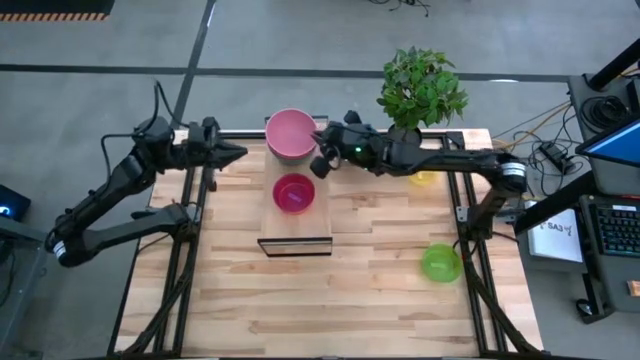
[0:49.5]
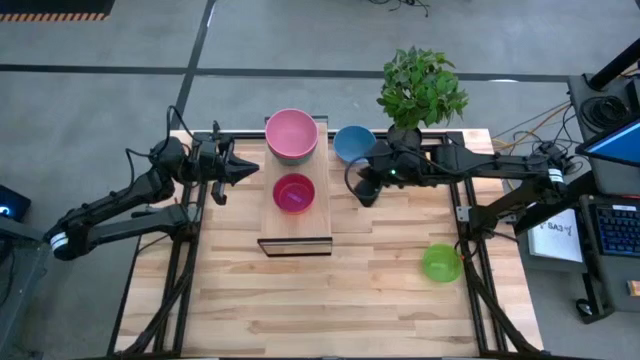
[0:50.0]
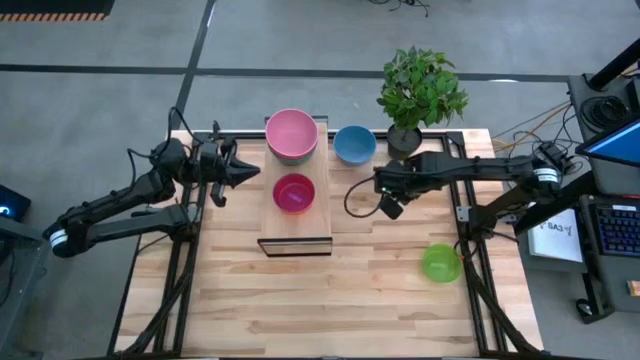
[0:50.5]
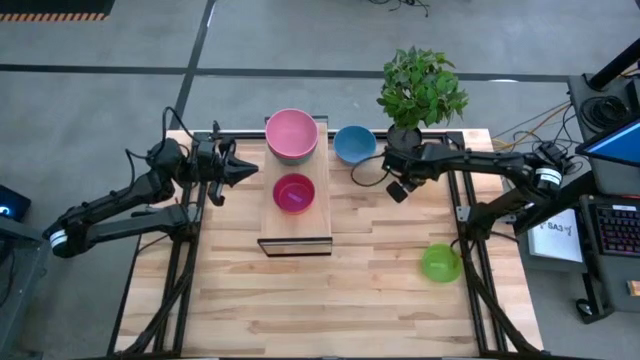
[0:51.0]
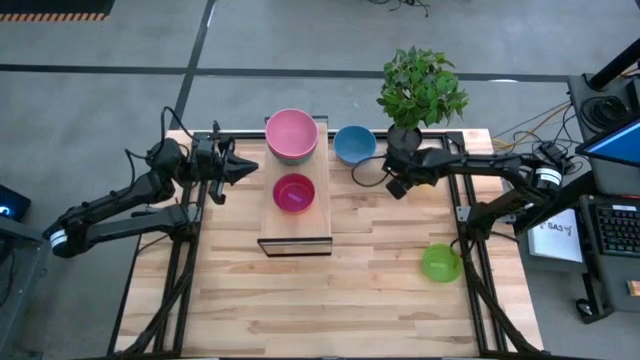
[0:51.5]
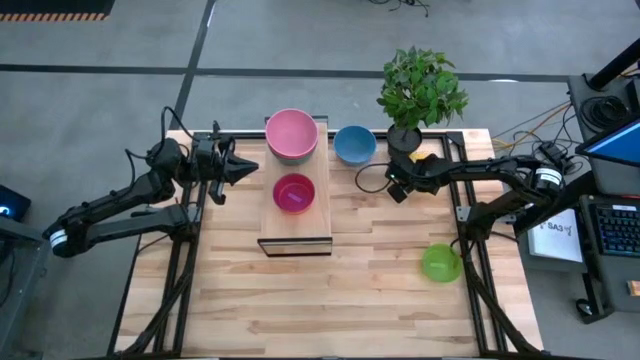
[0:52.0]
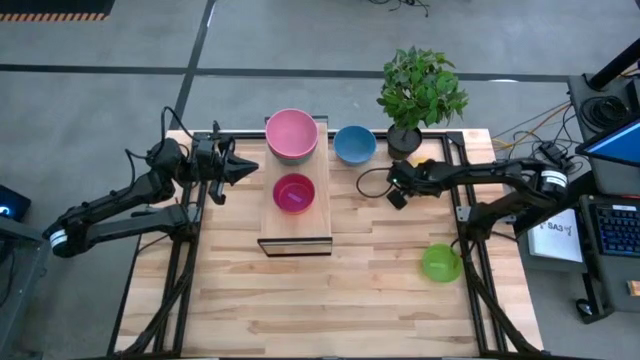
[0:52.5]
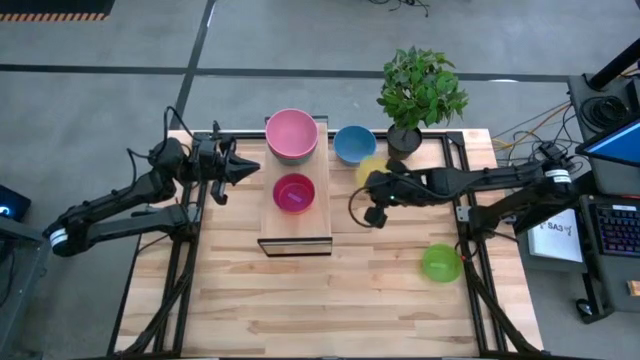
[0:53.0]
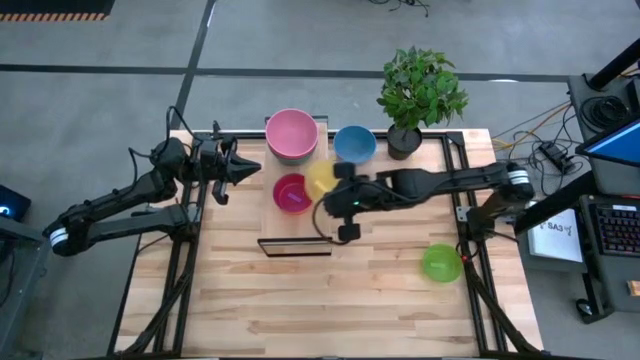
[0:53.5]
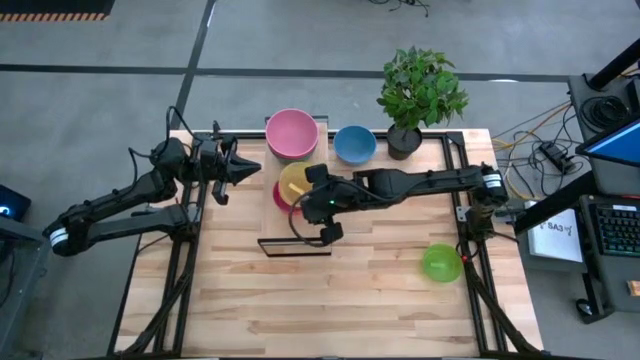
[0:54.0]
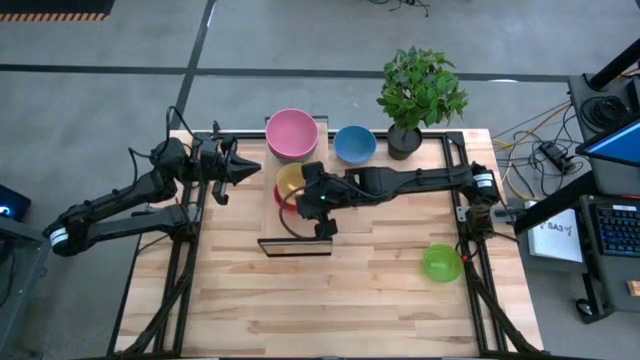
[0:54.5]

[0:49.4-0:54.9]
Task: Place and stack bowls onto a shelf
Stack the yellow bowl on top of the purple bowl on the shelf

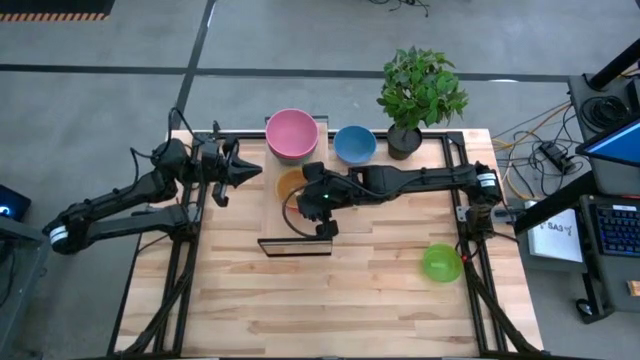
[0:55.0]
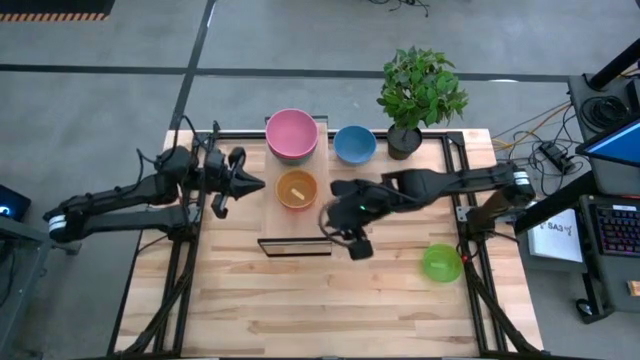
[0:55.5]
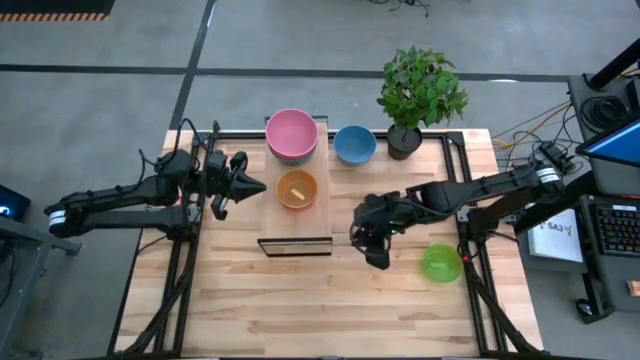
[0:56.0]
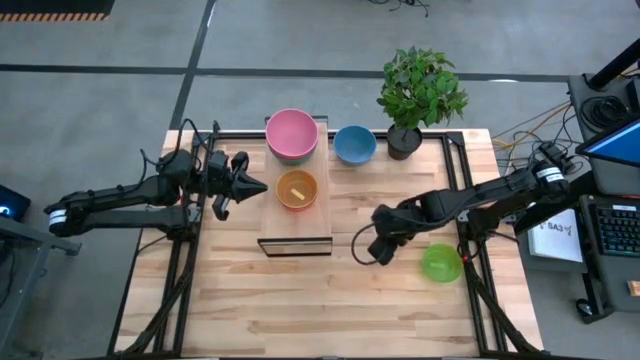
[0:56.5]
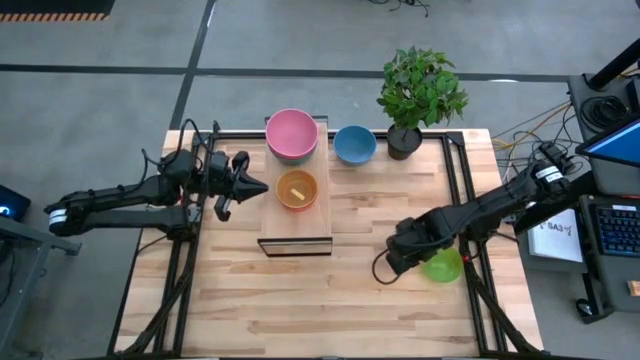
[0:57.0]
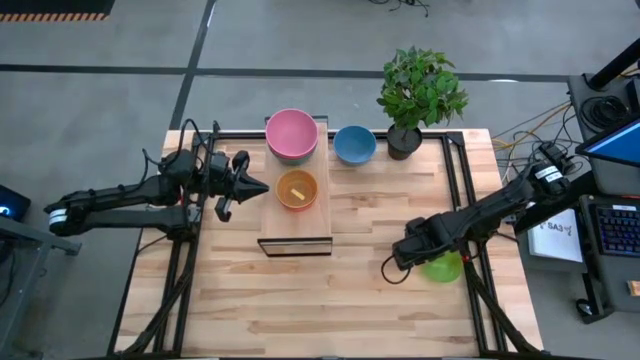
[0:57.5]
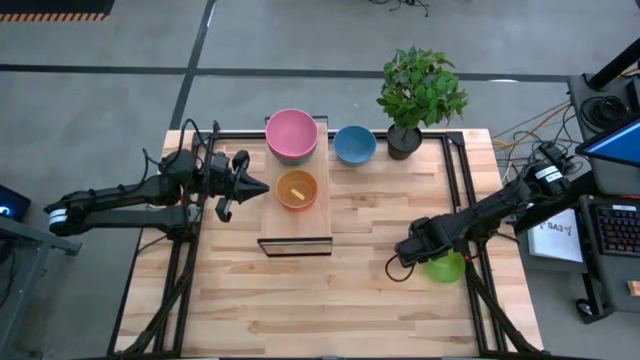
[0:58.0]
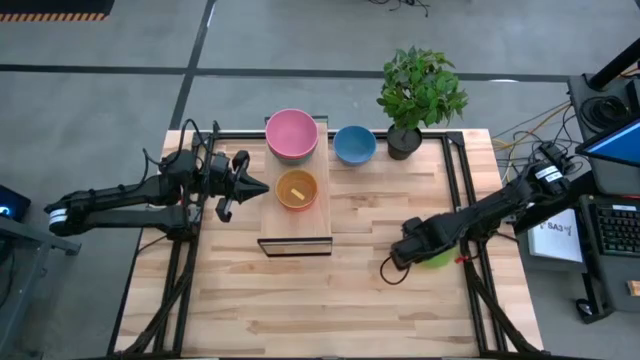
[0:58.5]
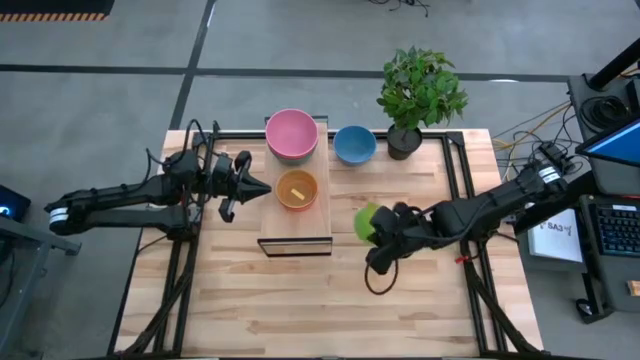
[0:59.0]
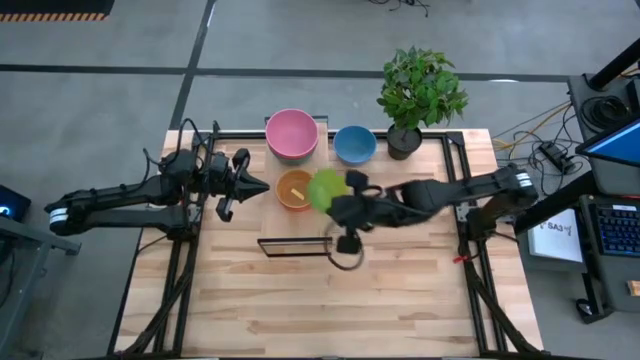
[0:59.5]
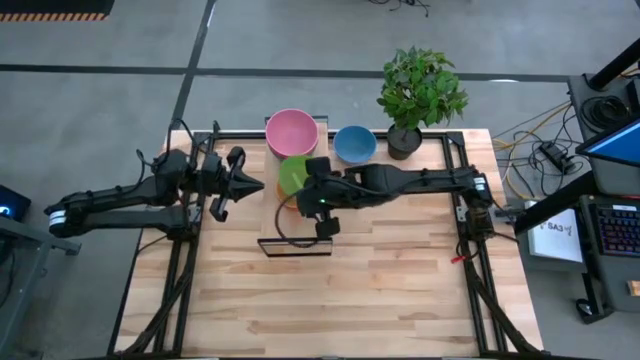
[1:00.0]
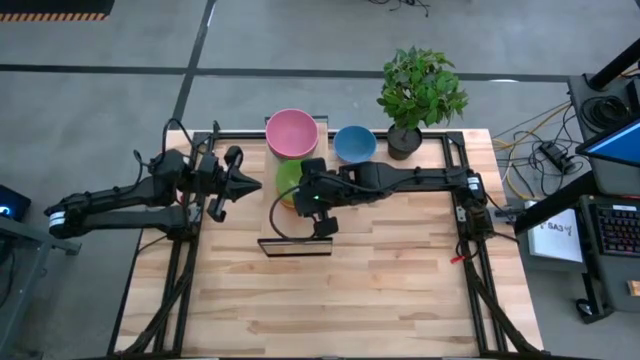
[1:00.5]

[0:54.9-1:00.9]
Stack the green bowl on top of the yellow bowl on the shelf

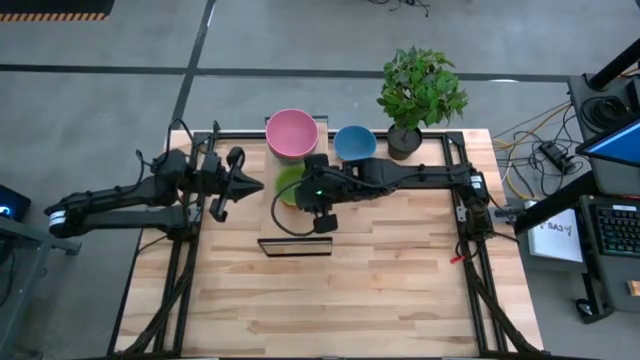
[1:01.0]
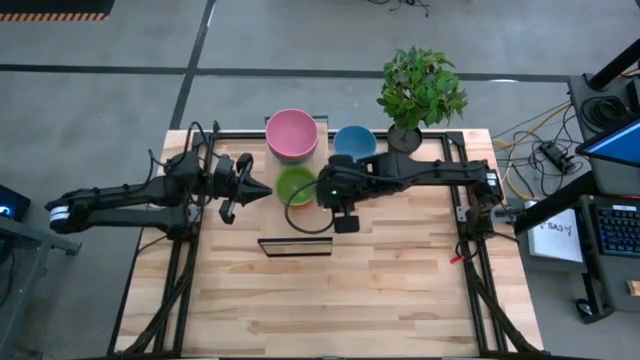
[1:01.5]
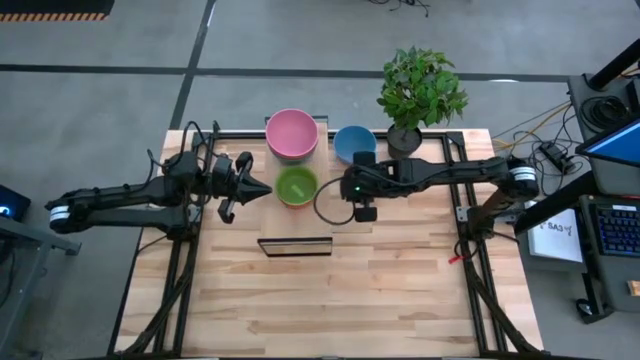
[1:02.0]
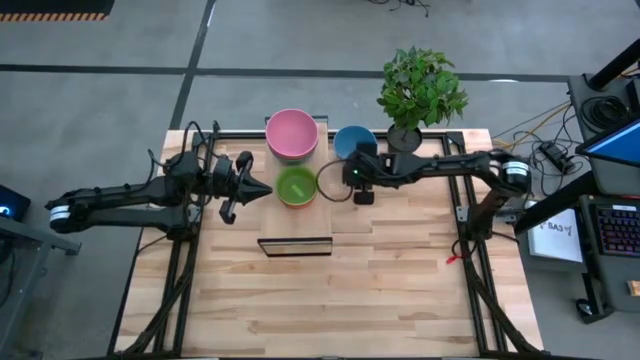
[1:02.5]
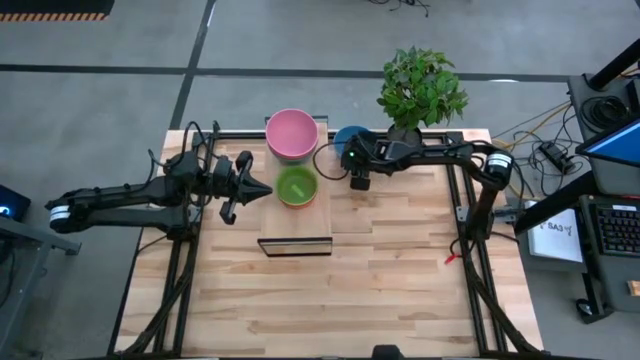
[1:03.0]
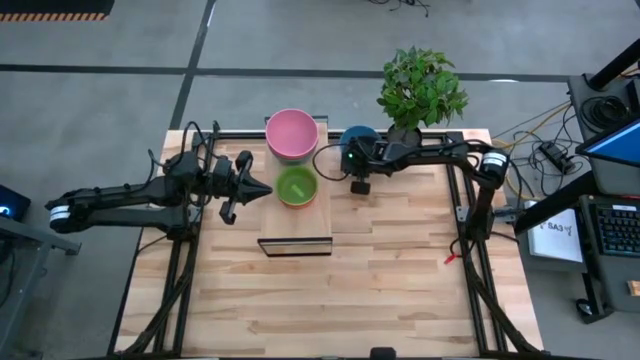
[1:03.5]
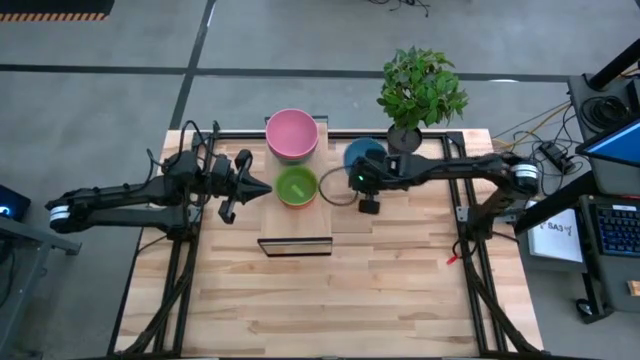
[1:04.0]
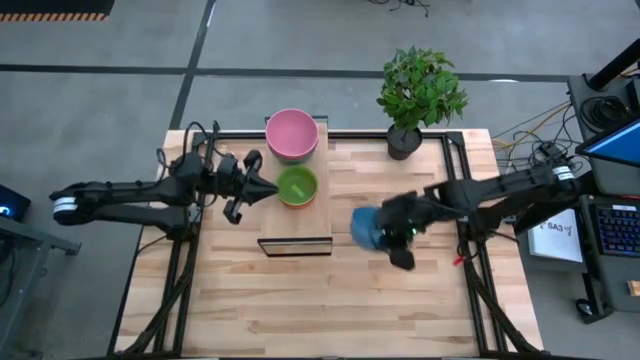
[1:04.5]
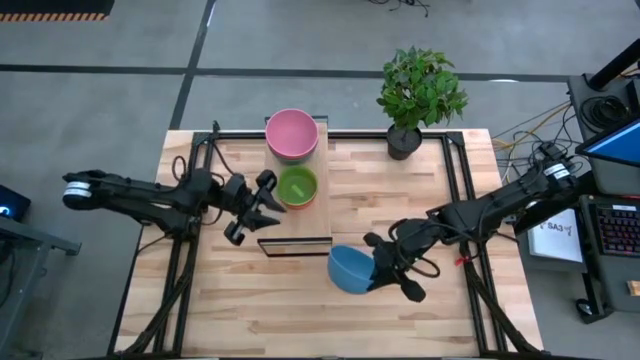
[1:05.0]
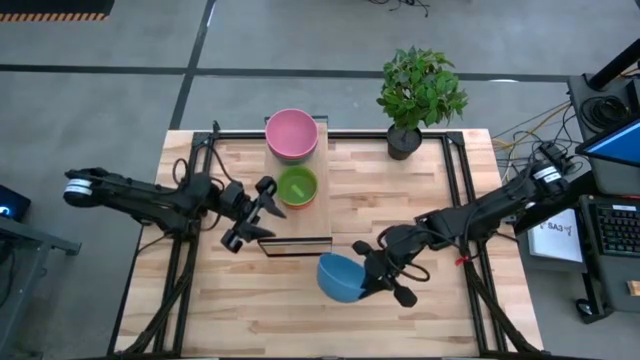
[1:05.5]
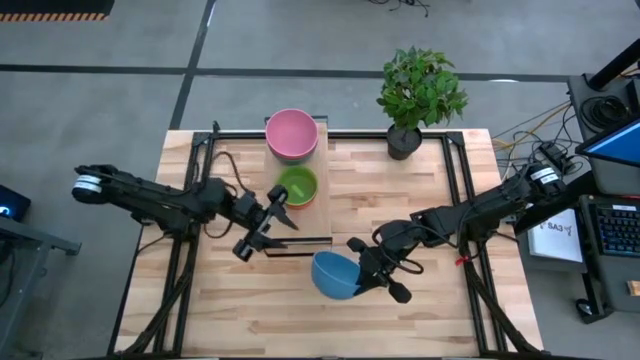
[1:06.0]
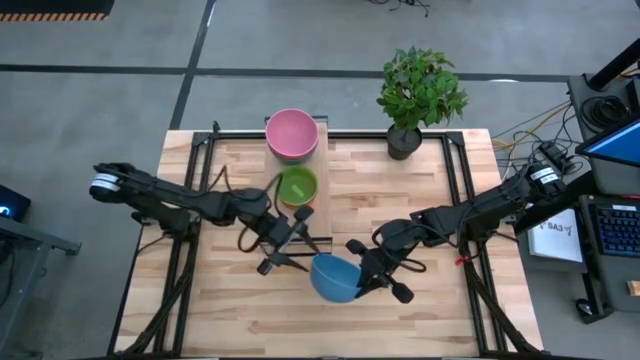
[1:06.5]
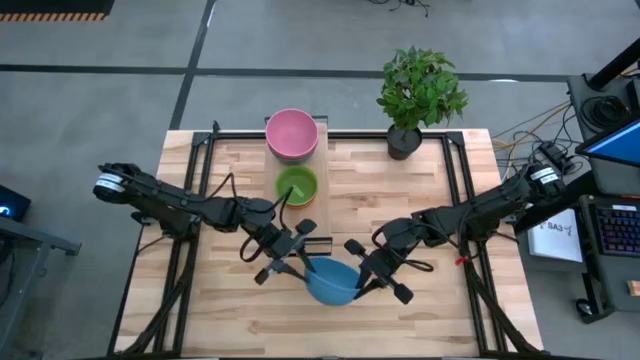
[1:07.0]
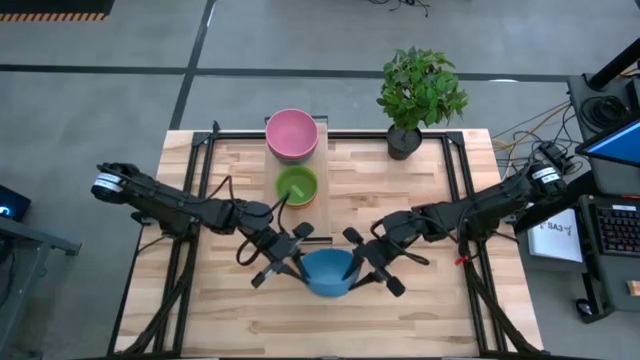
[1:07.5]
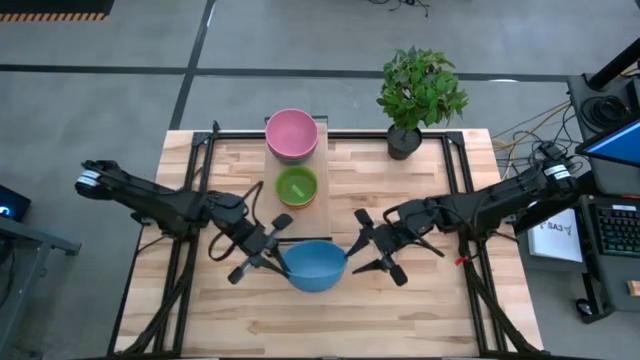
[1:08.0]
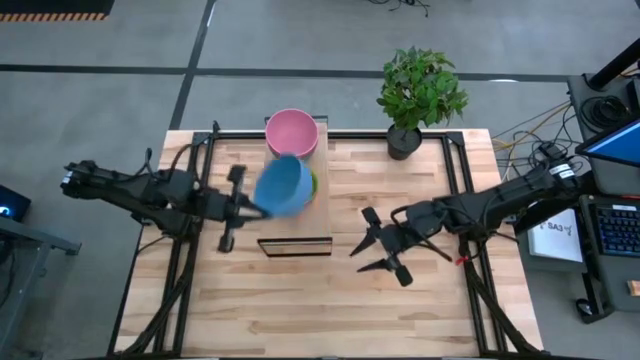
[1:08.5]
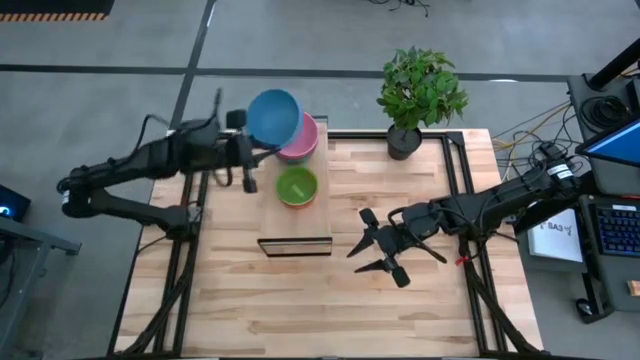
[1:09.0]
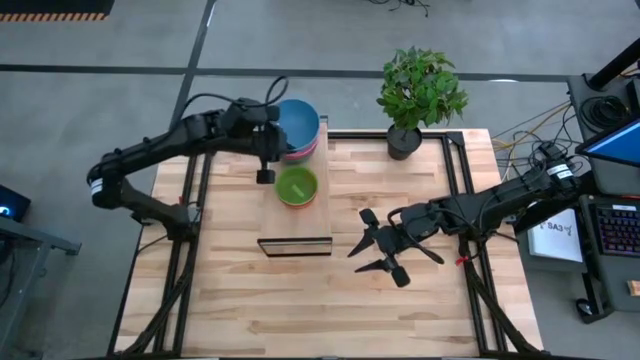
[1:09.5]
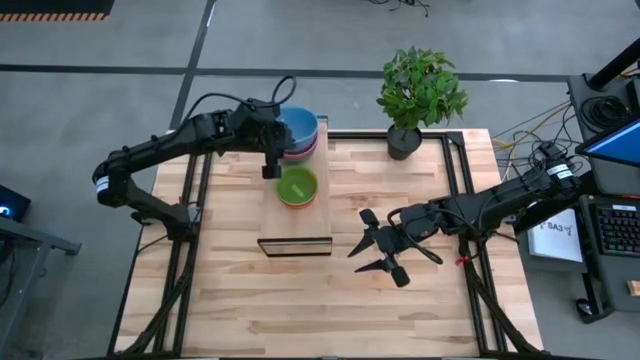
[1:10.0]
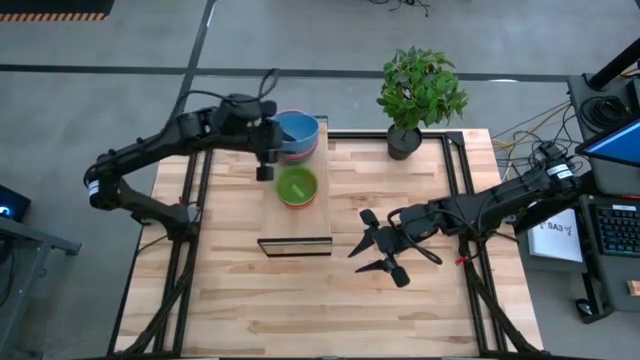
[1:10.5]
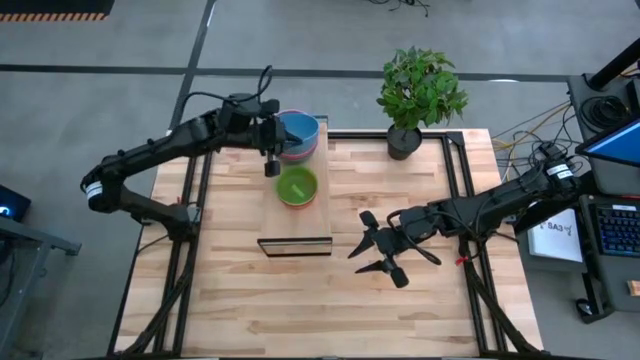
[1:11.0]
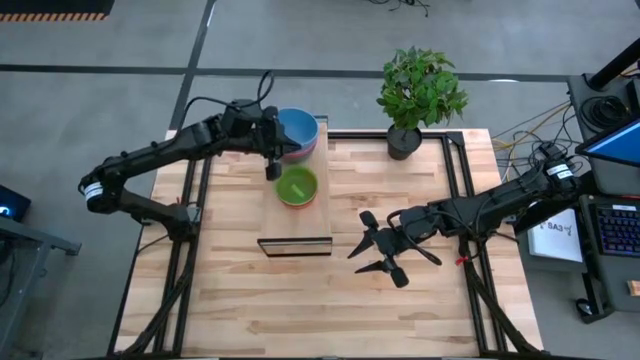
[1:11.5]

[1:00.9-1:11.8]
Stack the blue bowl on top of the pink bowl on the shelf
